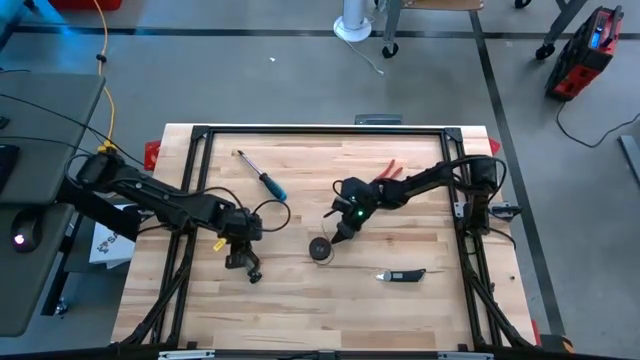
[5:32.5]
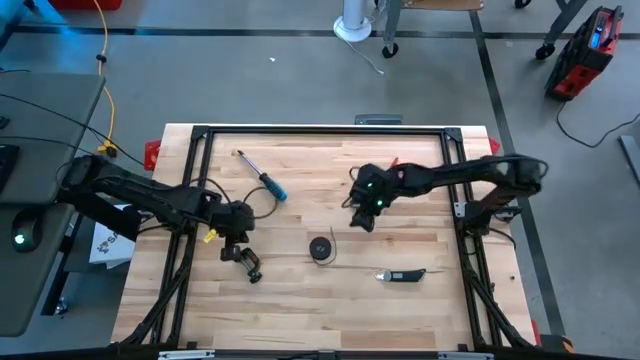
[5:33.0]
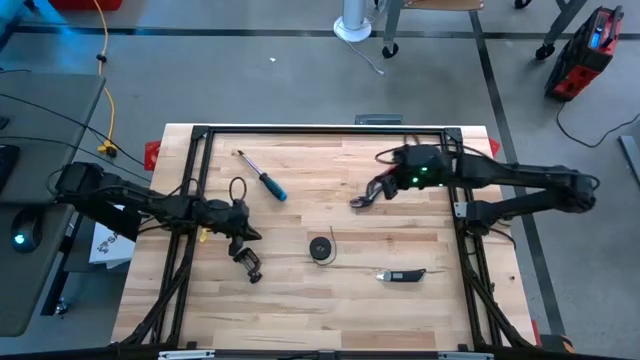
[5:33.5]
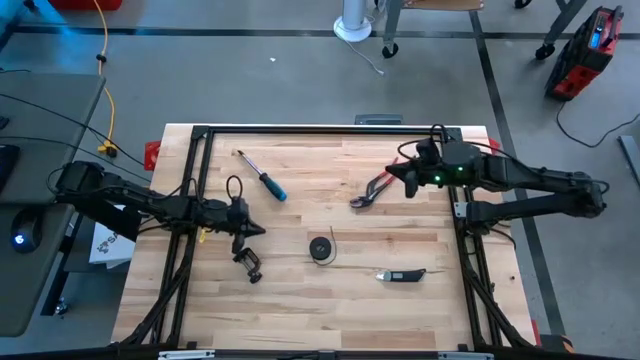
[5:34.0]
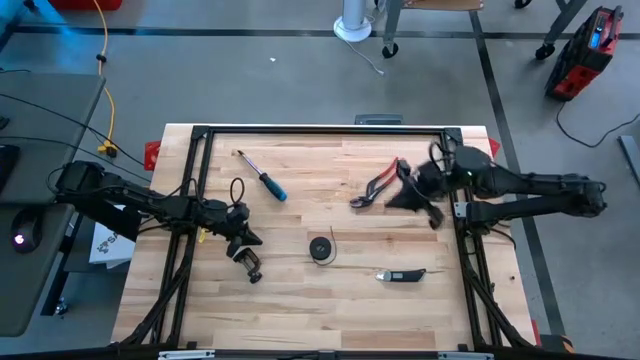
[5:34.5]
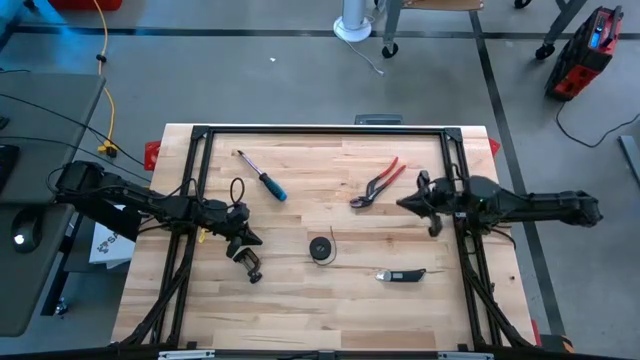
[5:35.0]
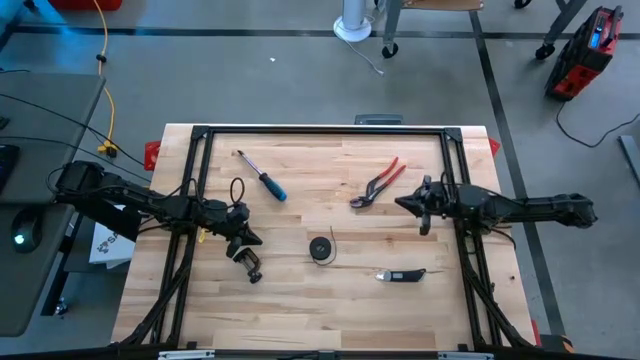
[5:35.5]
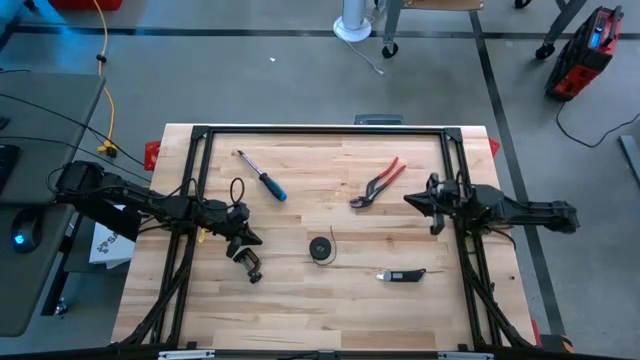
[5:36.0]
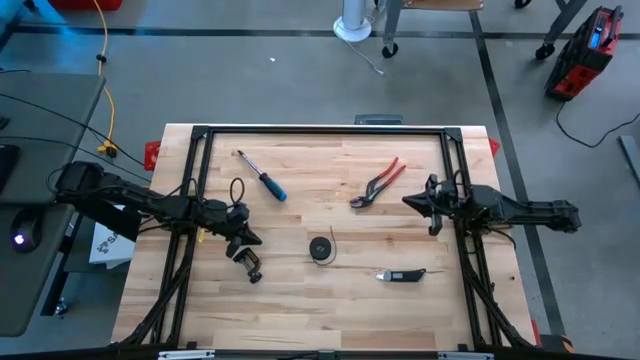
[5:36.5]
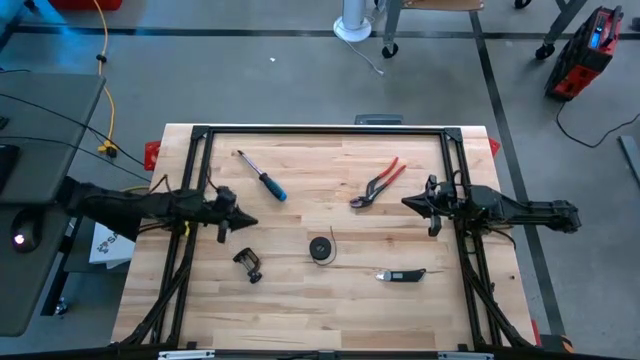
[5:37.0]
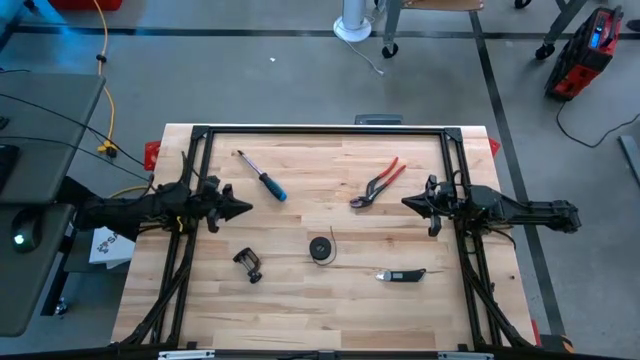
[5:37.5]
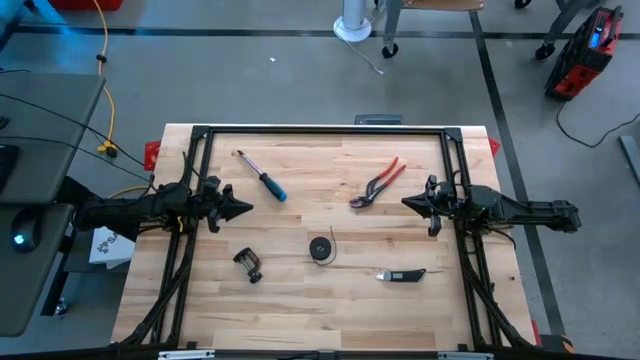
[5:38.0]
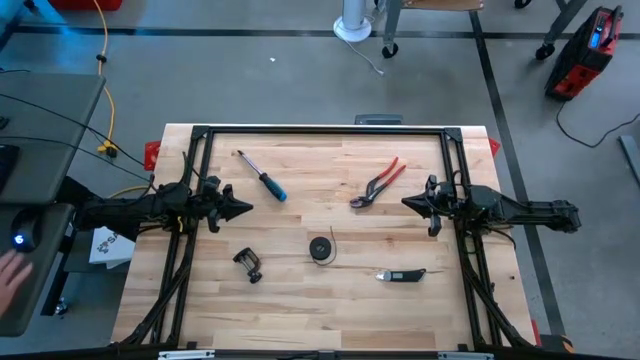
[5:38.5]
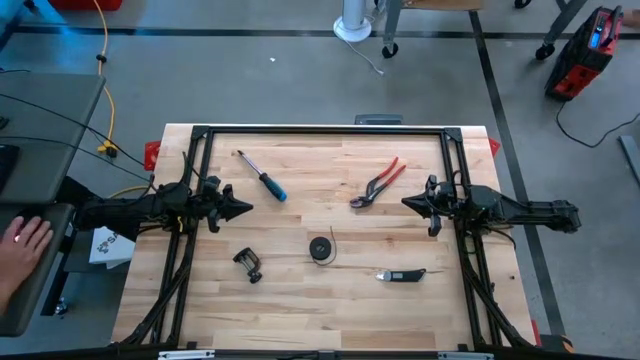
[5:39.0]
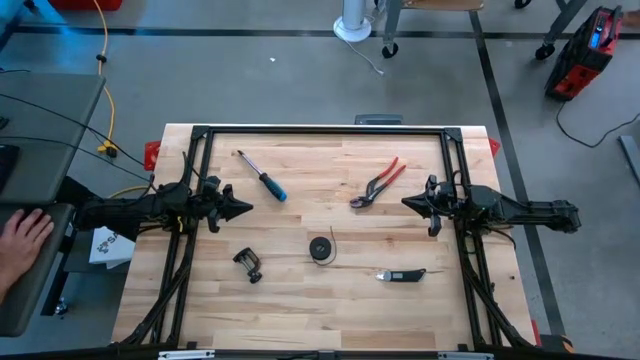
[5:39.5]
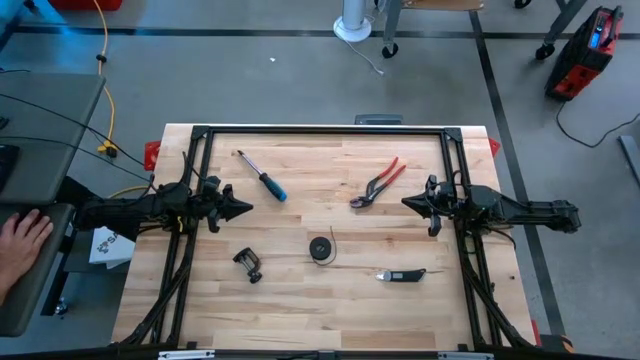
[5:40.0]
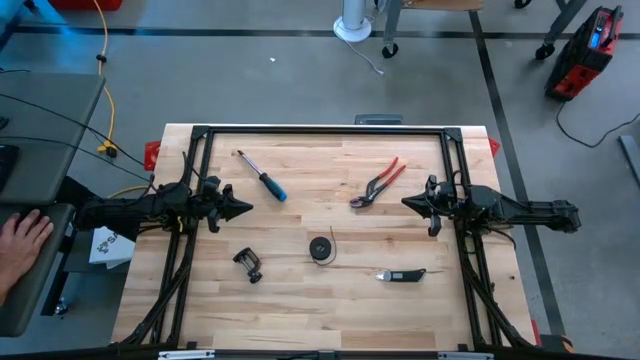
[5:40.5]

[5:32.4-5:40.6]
Task: Coil cords
Return to Home Position

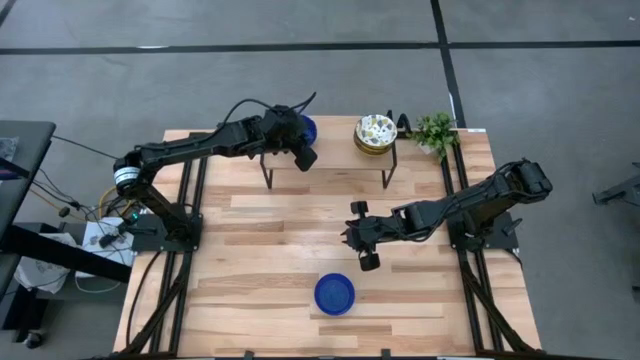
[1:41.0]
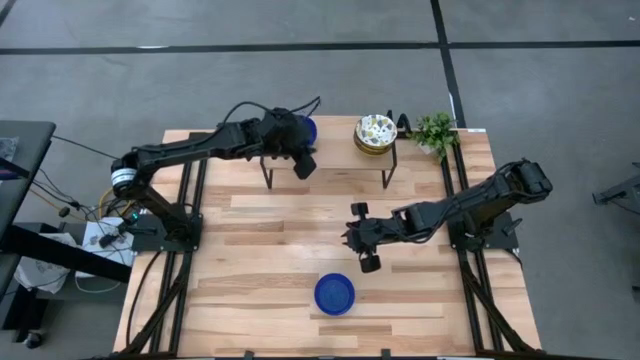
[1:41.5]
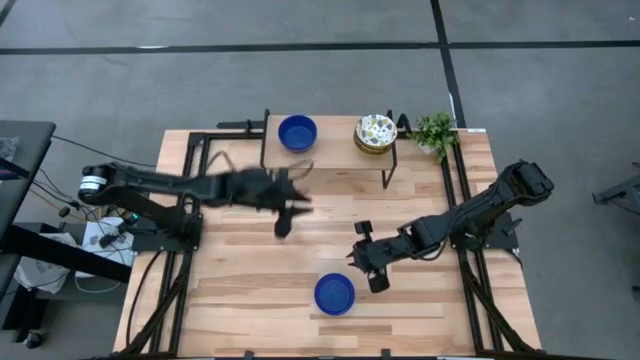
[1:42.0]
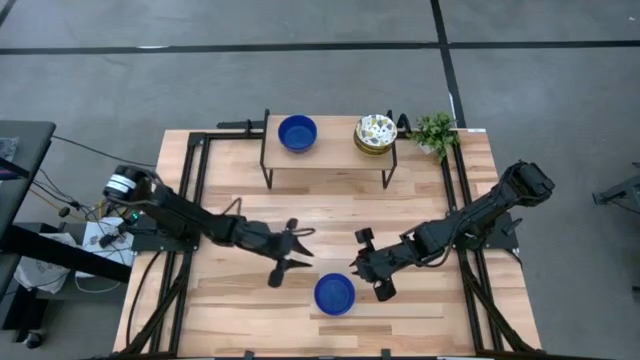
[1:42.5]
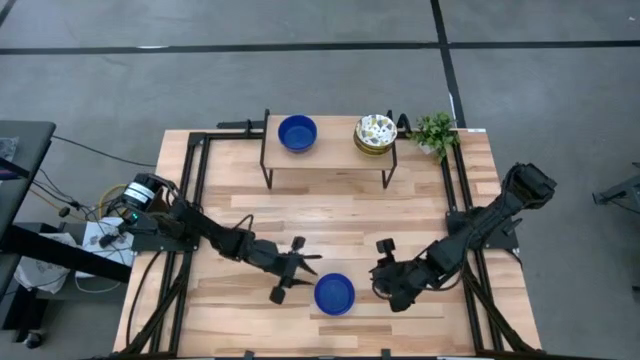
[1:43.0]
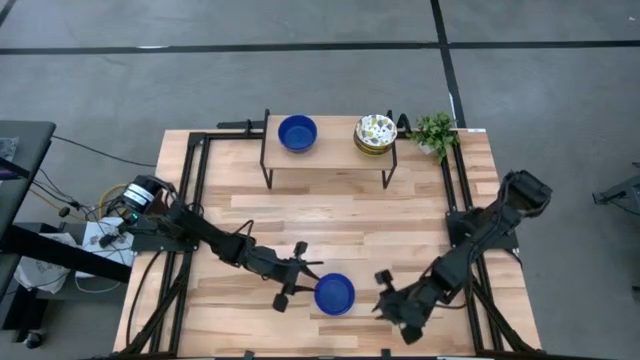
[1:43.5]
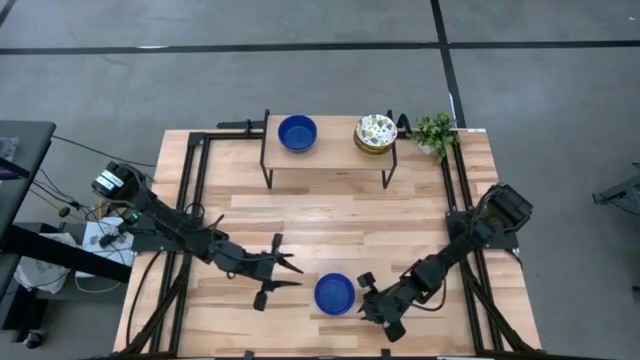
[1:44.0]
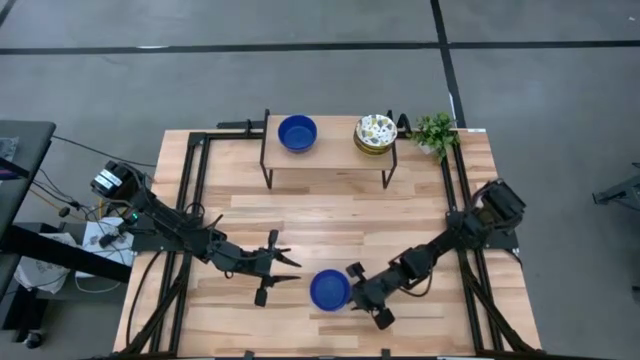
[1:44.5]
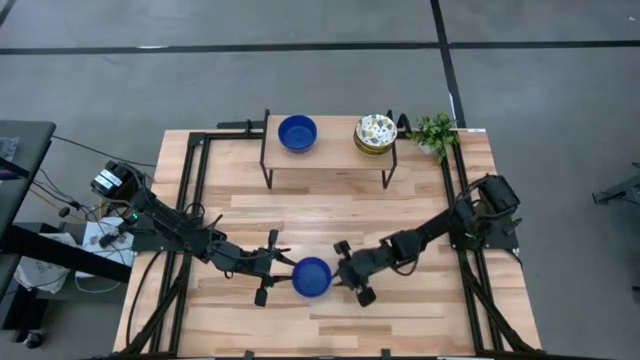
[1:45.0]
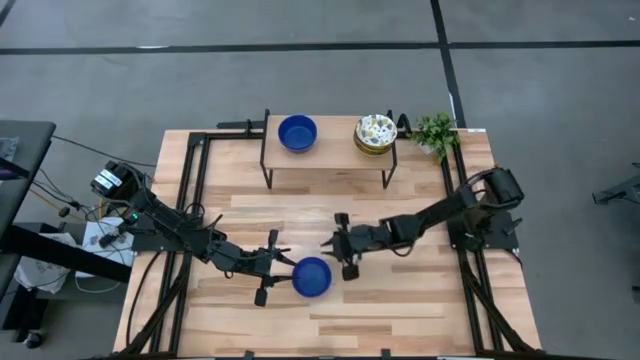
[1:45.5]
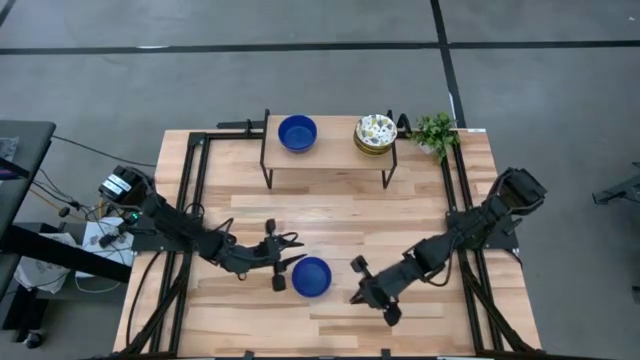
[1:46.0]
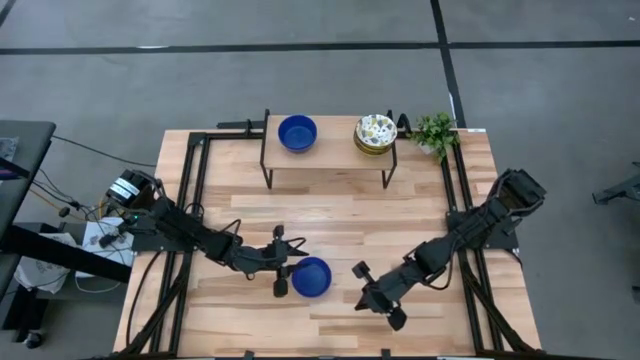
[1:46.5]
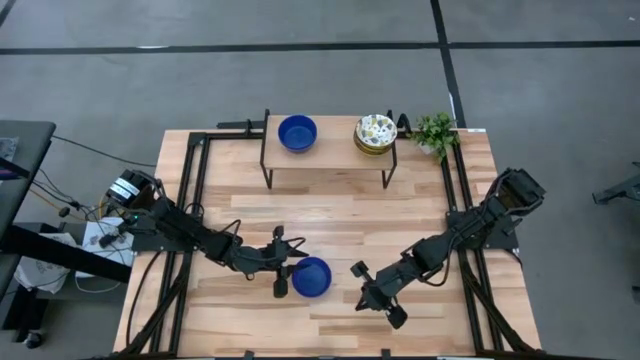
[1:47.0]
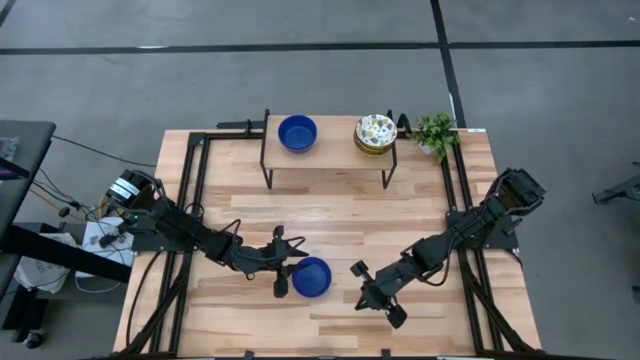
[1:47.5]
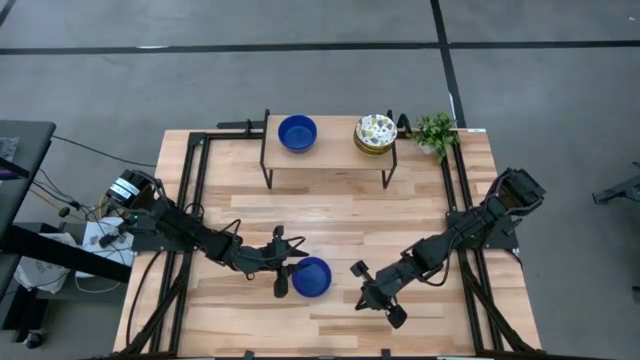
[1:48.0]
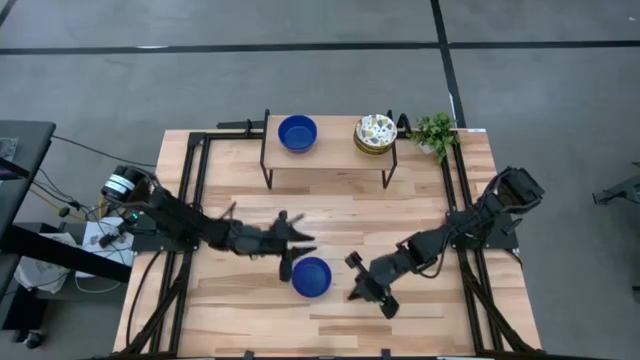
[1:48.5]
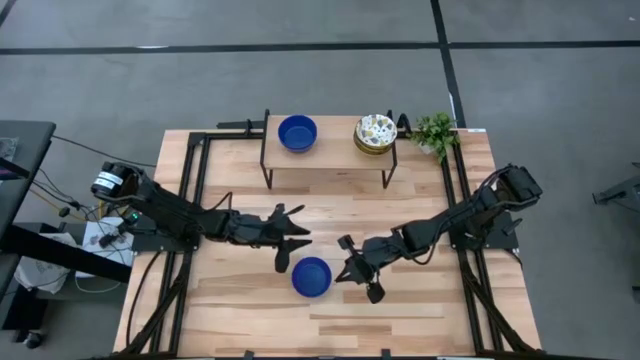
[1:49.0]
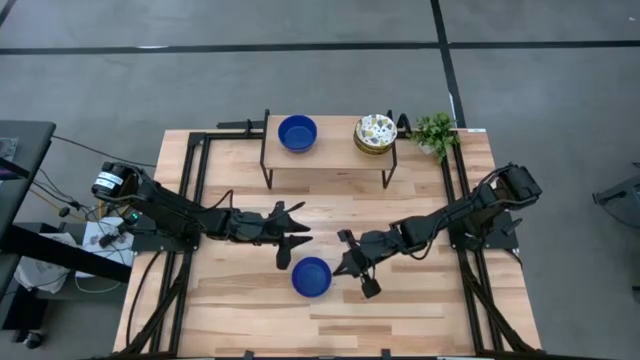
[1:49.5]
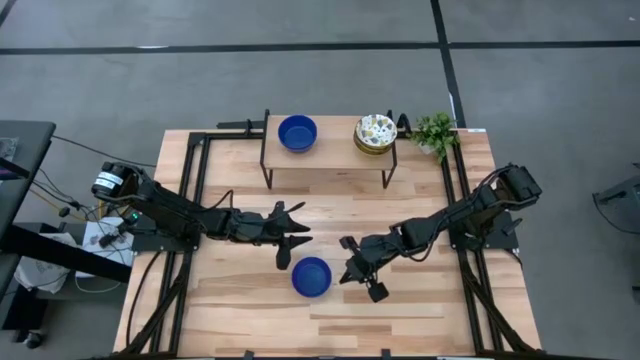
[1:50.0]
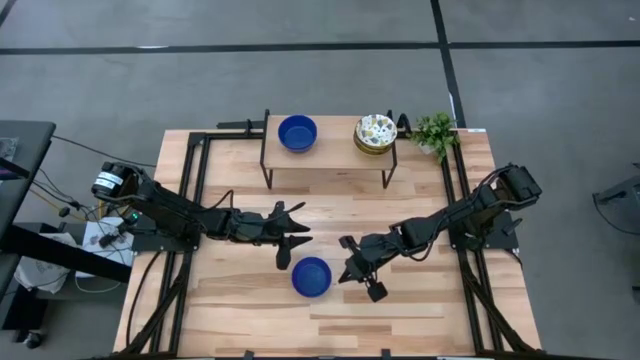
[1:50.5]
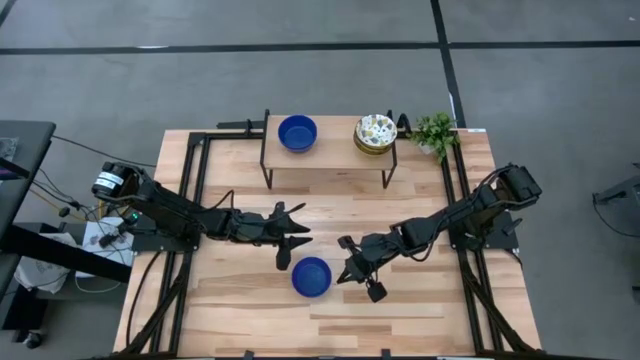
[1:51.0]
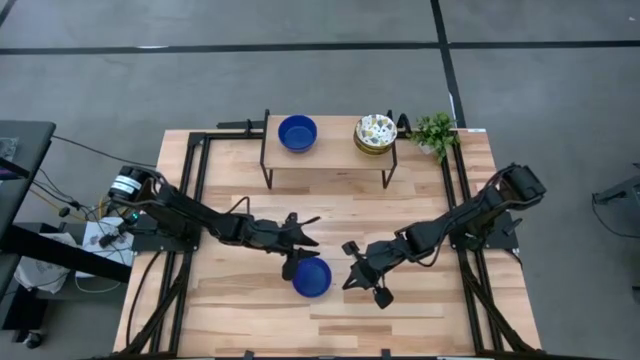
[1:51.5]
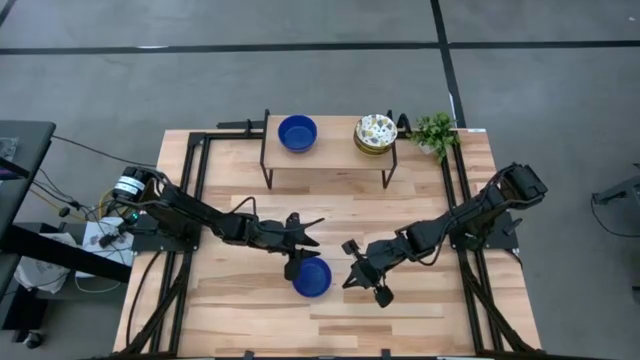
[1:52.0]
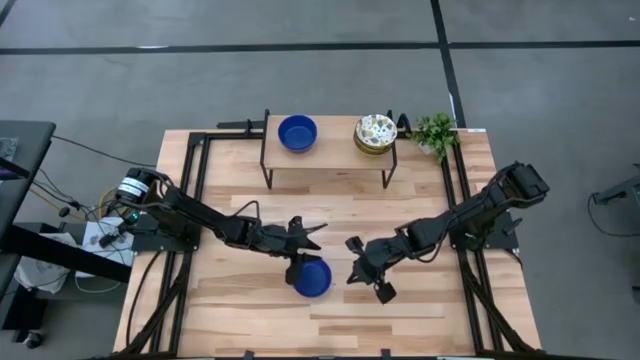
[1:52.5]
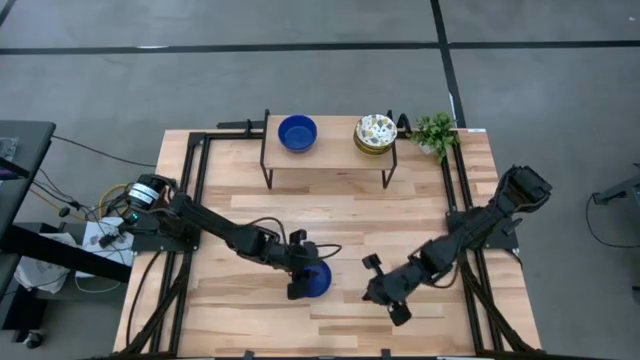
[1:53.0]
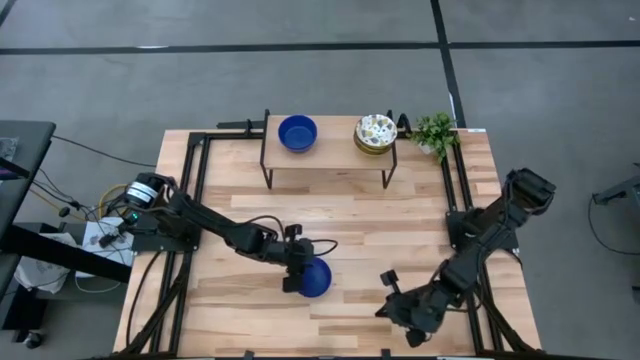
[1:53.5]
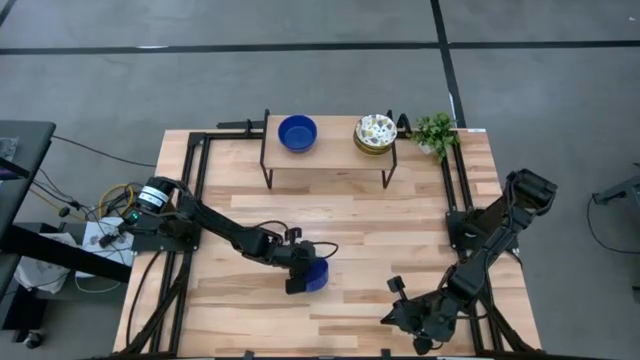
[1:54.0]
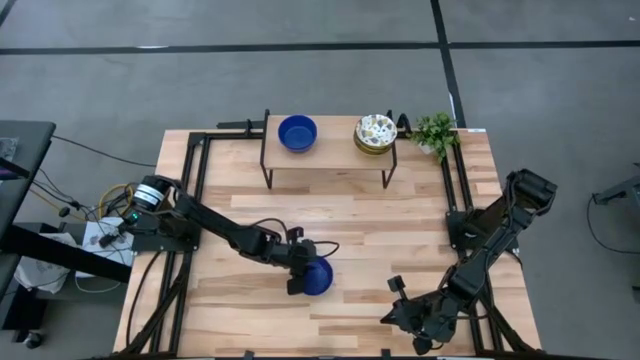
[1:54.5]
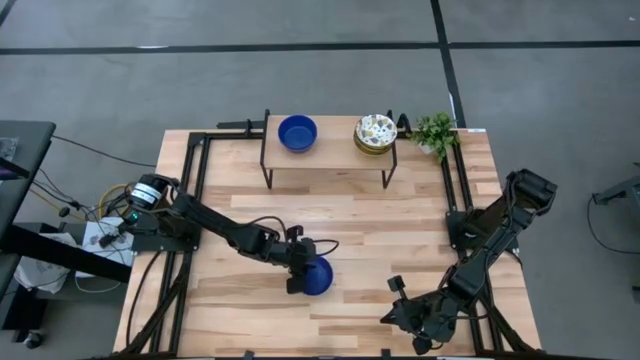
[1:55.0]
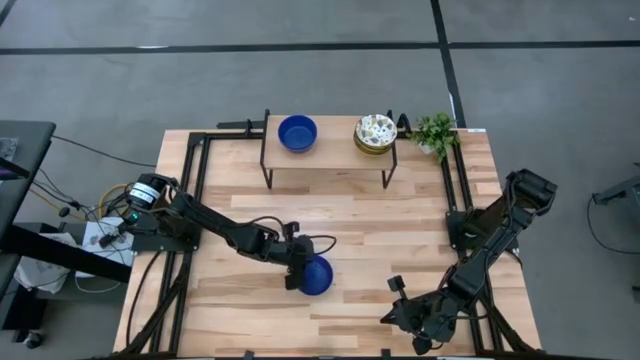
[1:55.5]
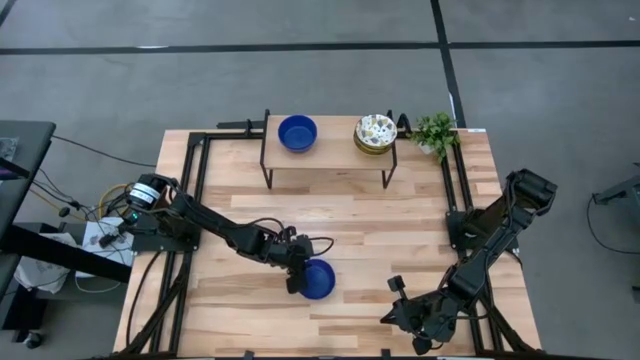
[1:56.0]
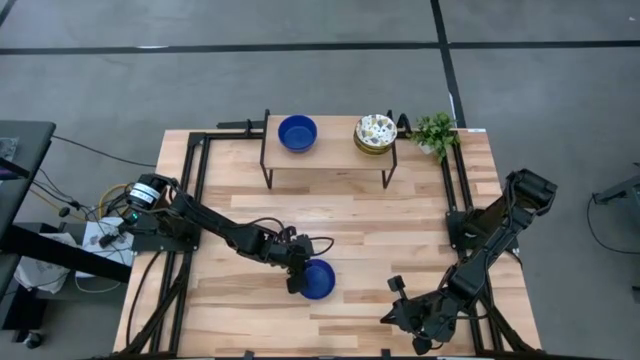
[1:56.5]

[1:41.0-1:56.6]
Task: Pick & Place Mini bowls
Stack the blue bowl on the blue bowl on the shelf
